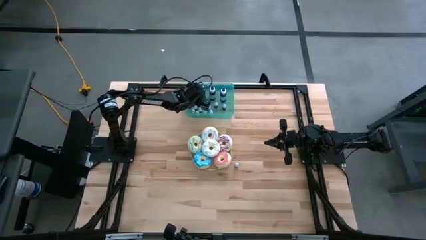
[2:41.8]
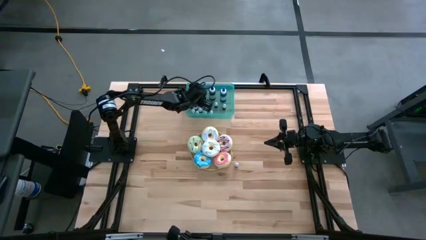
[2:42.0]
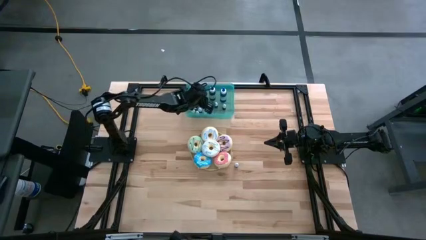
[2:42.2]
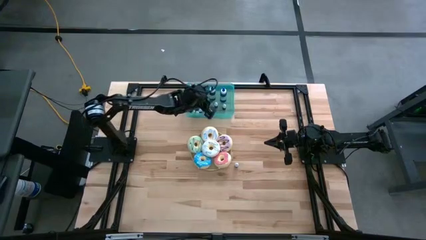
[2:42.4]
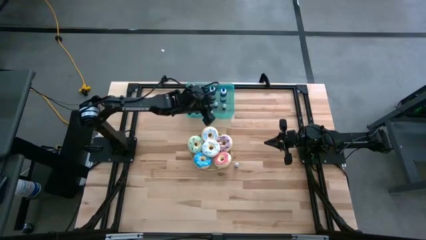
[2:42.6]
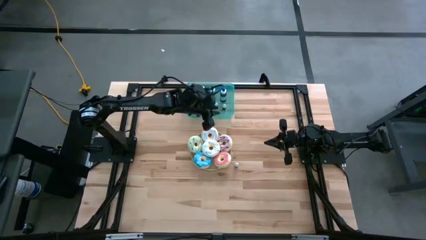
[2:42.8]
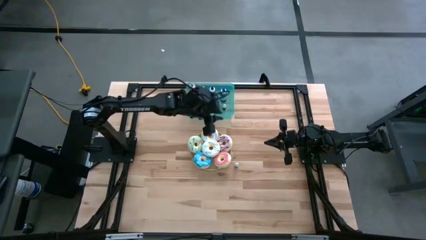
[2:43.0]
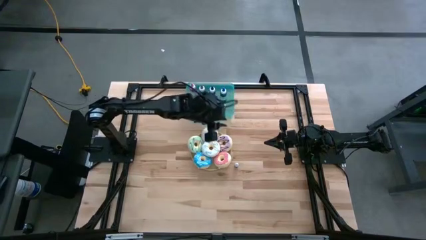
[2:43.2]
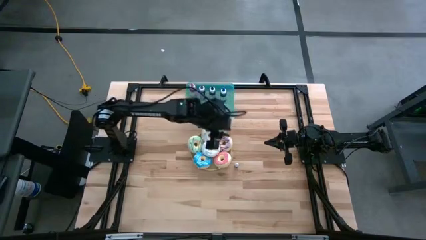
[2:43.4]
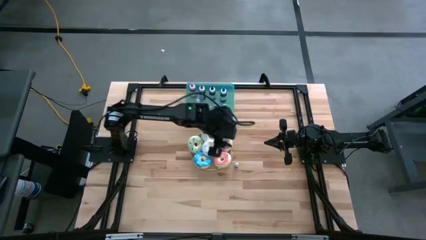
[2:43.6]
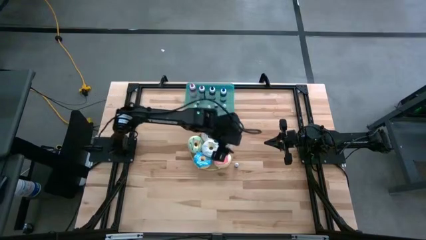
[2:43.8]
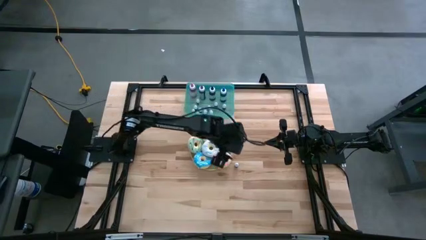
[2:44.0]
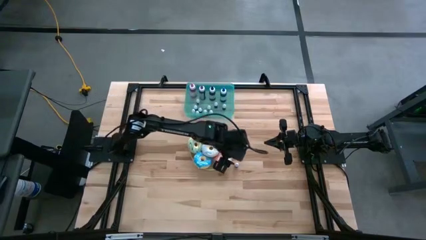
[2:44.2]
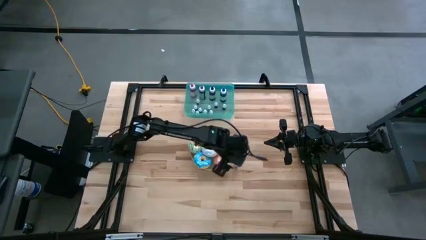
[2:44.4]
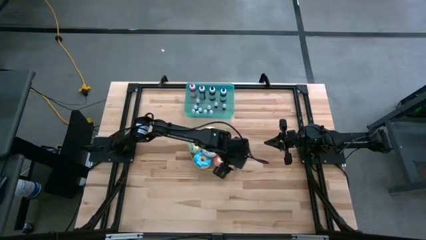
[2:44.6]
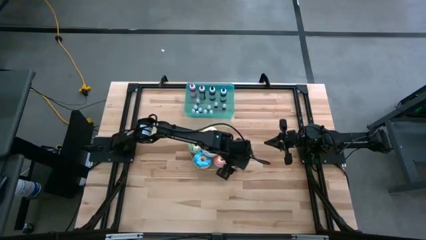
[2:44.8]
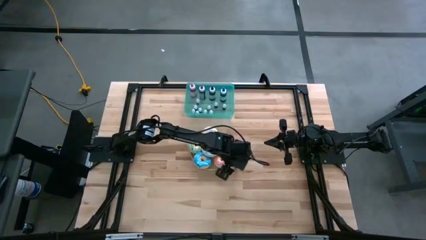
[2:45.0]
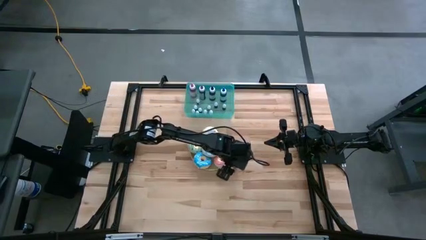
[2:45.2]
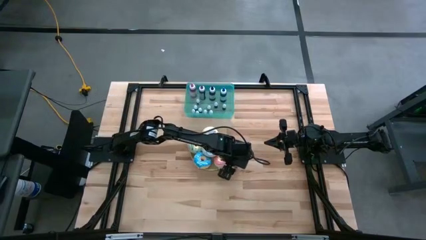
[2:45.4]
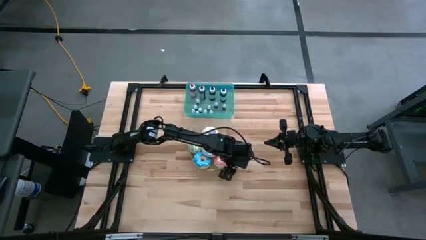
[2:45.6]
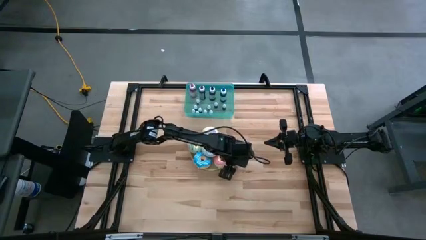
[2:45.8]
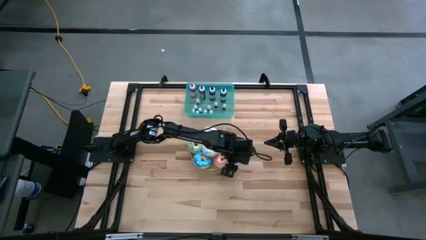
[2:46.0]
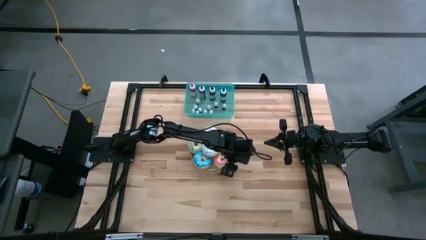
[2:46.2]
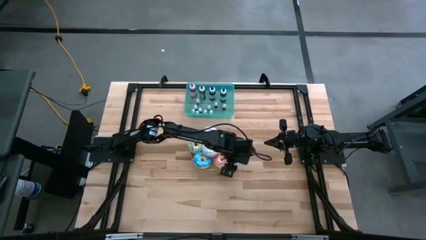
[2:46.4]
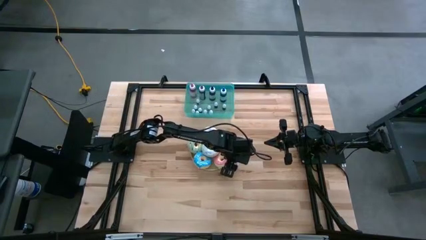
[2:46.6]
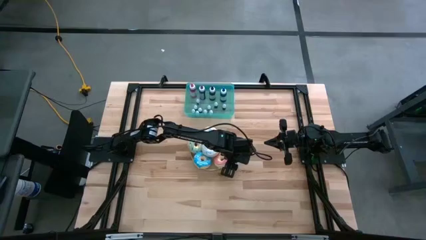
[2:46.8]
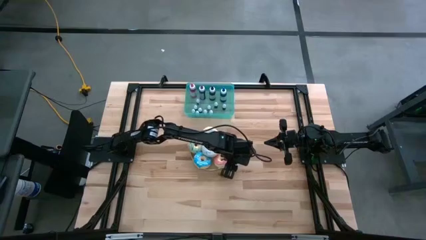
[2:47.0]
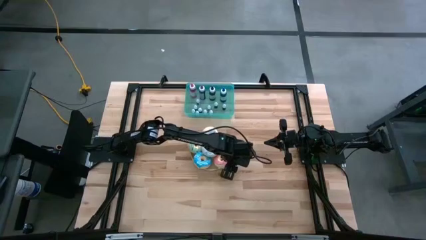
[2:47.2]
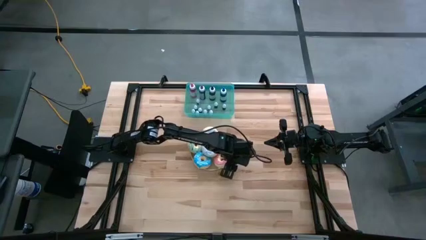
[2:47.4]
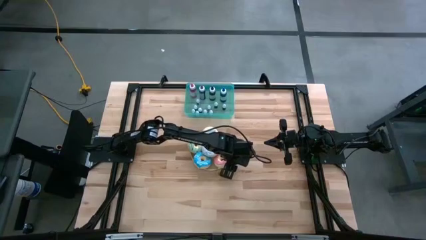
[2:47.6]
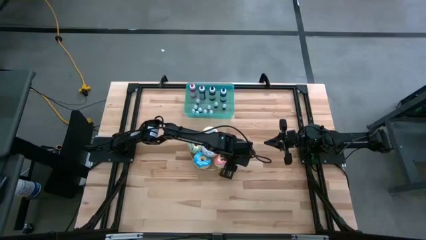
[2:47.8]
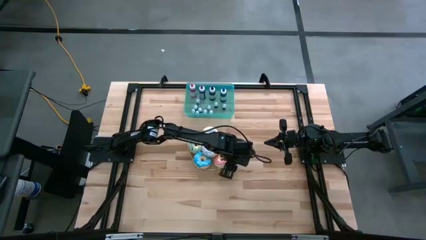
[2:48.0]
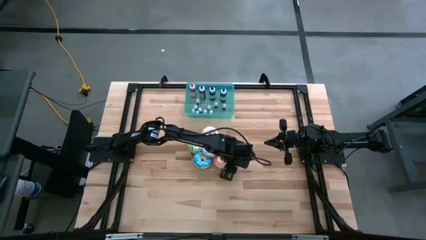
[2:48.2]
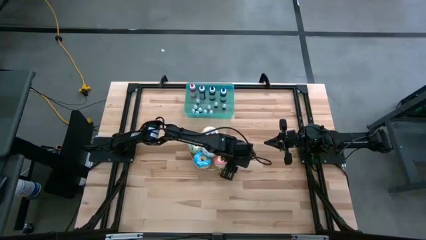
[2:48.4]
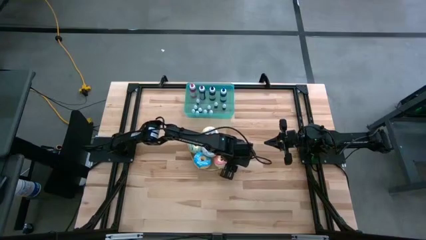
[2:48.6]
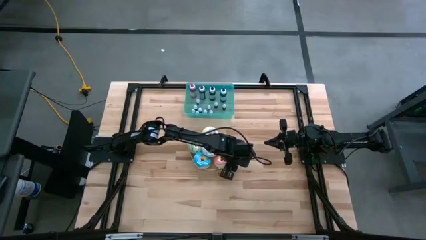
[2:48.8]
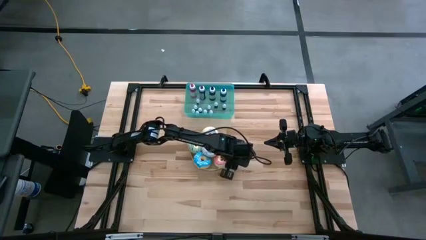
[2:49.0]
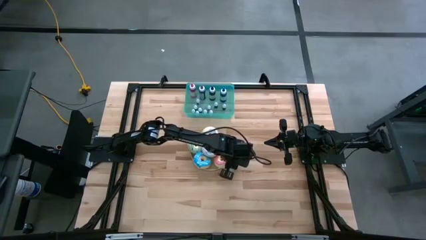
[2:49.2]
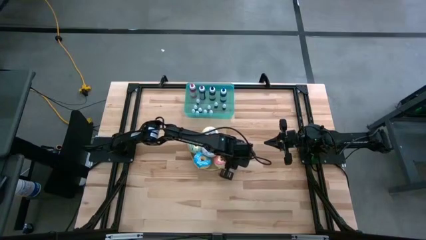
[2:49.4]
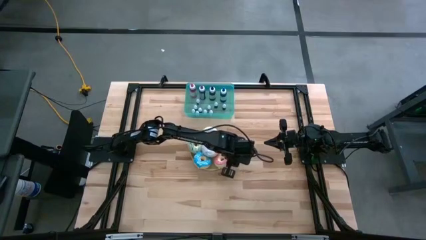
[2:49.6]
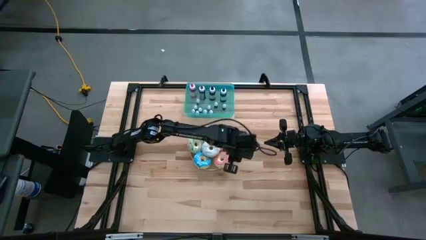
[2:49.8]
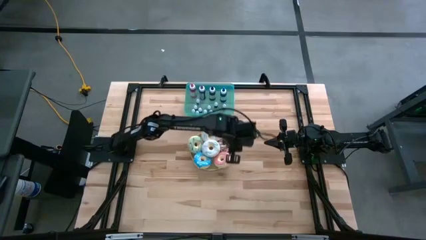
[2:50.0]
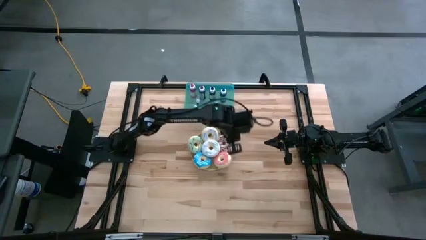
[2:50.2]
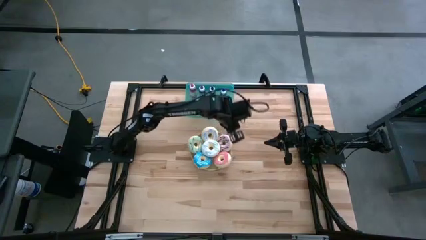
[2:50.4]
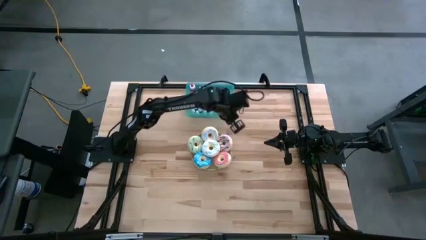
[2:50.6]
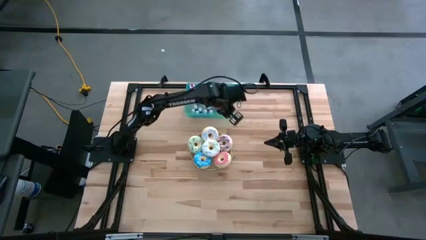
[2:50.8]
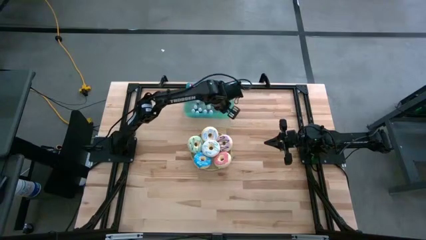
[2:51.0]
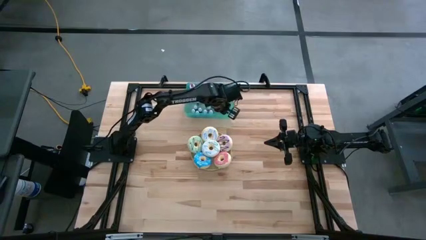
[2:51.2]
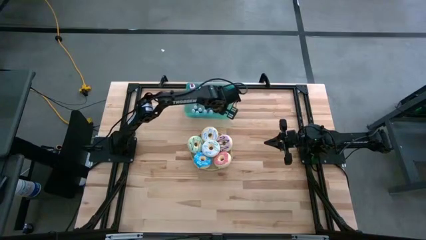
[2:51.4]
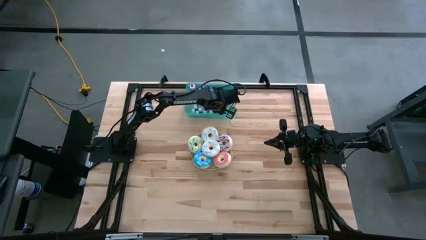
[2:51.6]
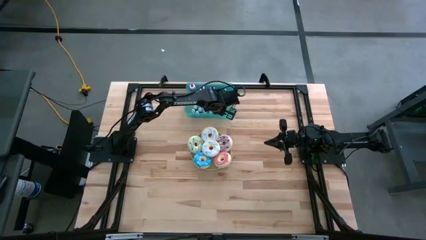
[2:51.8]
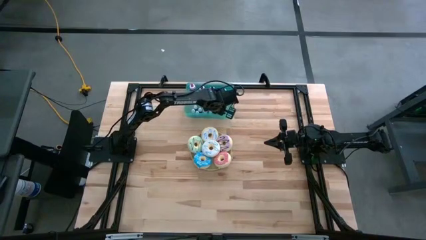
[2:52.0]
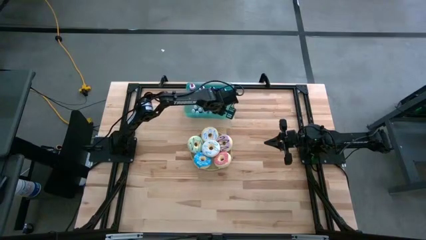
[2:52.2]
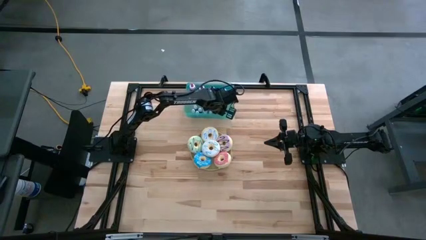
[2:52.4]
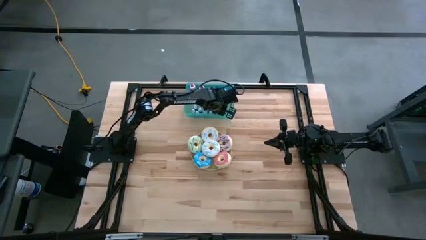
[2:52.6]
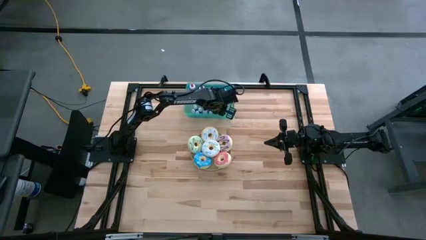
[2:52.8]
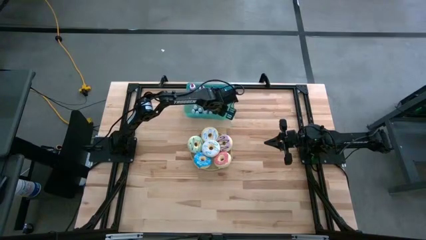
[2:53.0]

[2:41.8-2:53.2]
Task: Pick & Place food coloring
Put the small red food coloring bottle into the green container

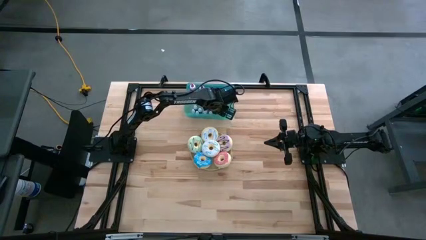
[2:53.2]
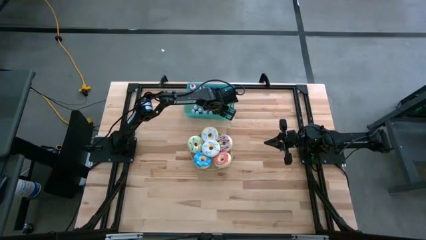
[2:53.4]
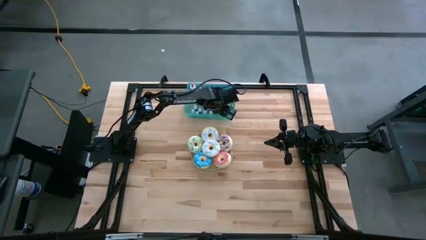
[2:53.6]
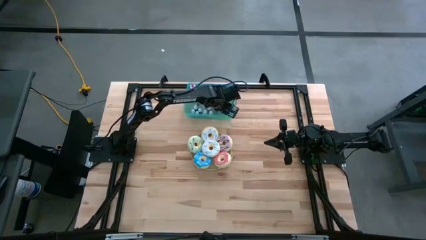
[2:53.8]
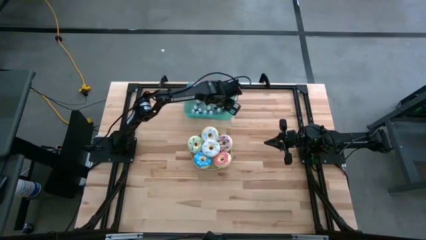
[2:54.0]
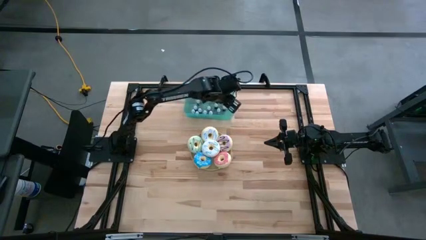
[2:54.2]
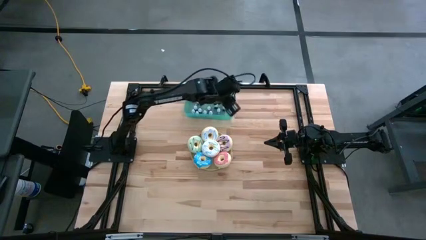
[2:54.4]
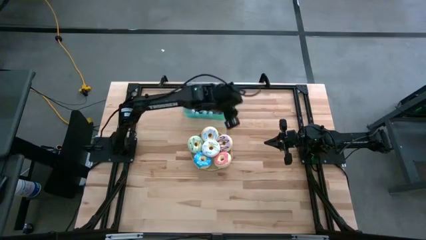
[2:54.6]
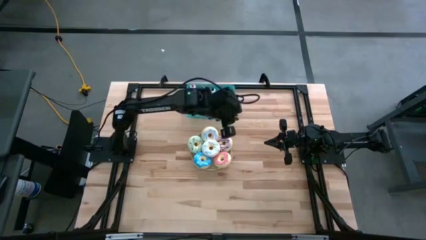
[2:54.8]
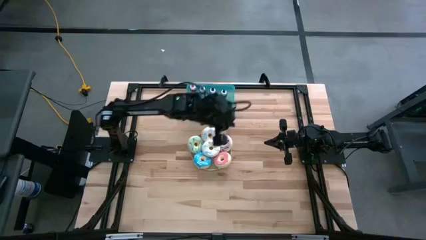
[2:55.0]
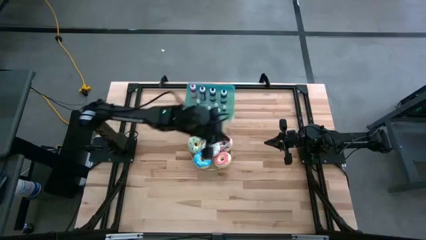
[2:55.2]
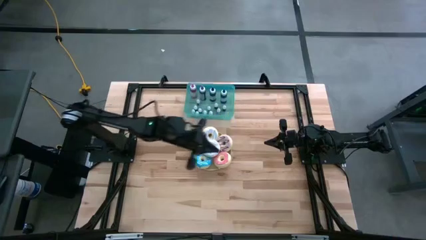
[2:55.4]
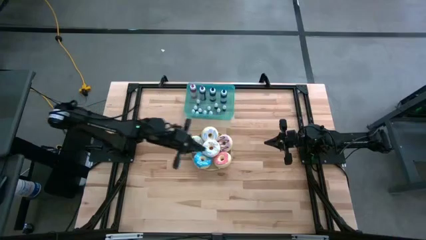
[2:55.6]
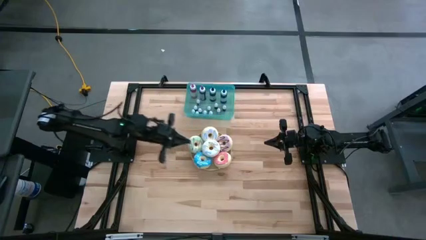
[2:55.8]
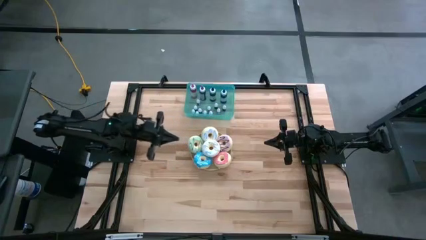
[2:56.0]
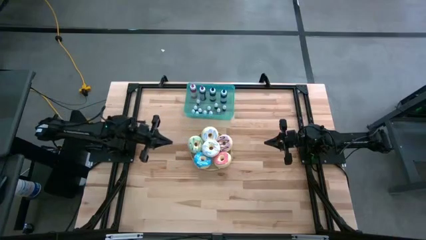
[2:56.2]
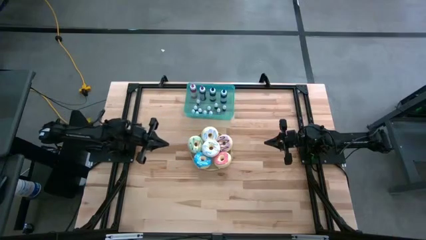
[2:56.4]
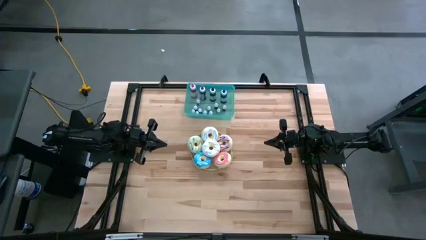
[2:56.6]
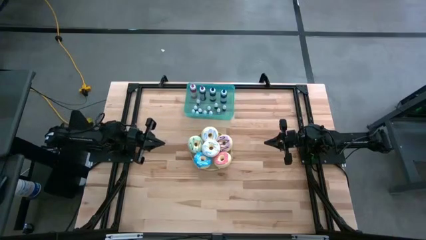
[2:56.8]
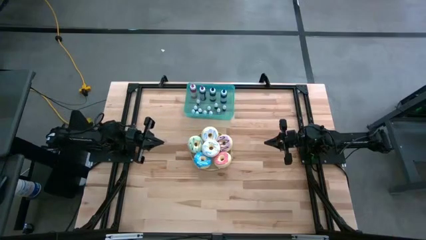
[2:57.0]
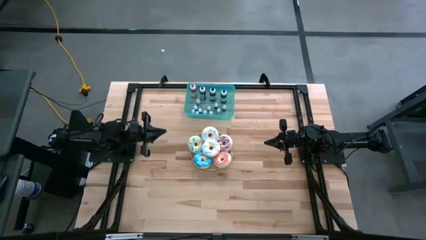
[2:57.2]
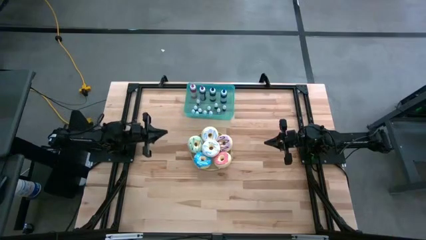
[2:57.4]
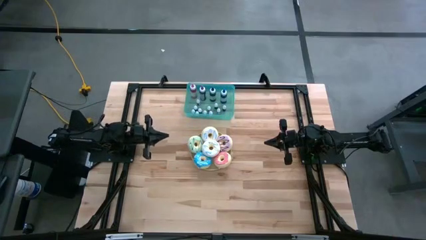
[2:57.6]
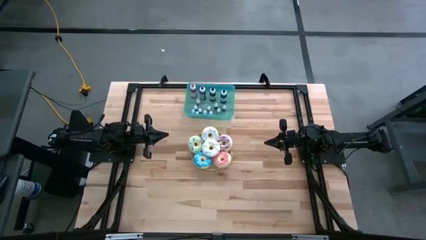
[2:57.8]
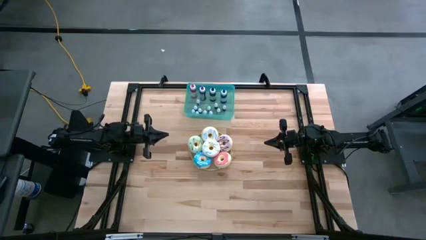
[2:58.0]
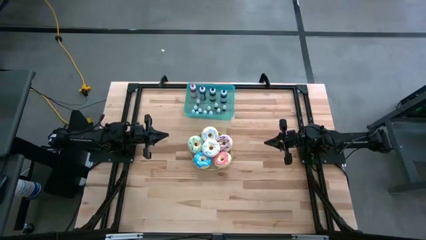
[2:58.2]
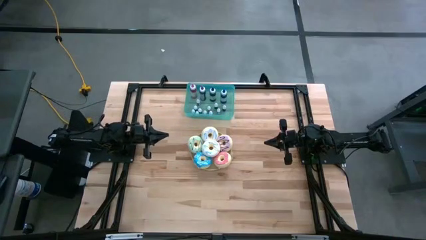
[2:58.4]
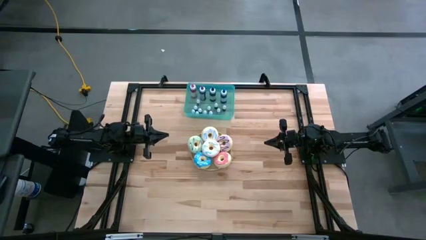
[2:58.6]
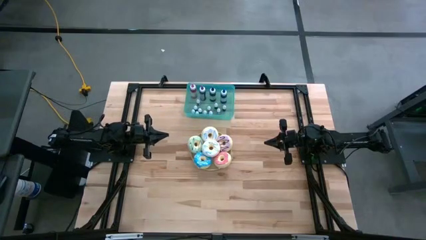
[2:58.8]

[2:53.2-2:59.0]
Return to Home Position
